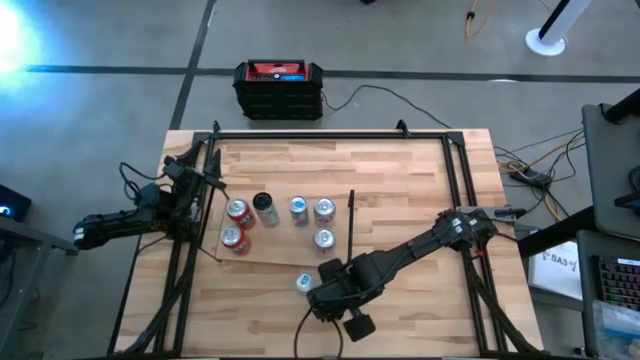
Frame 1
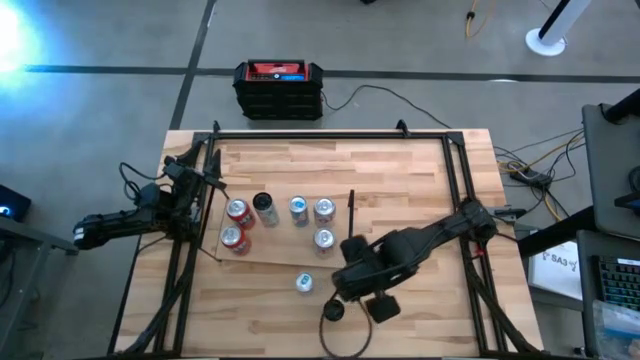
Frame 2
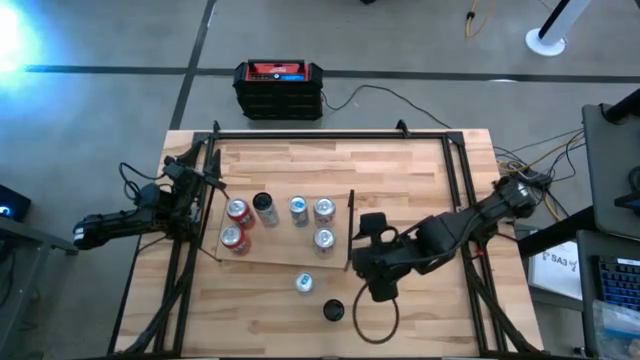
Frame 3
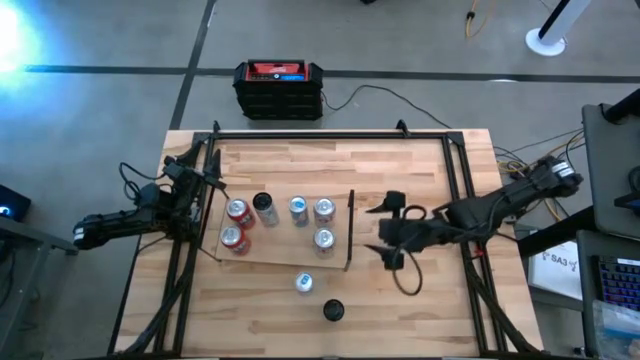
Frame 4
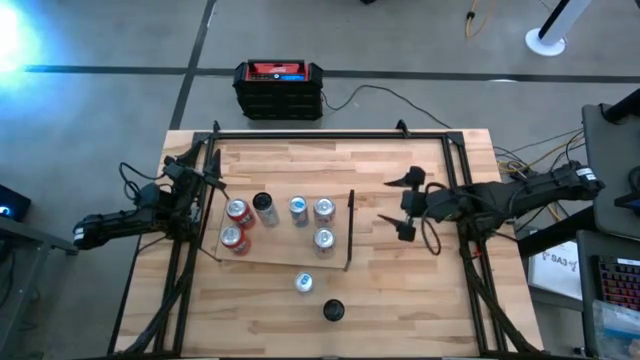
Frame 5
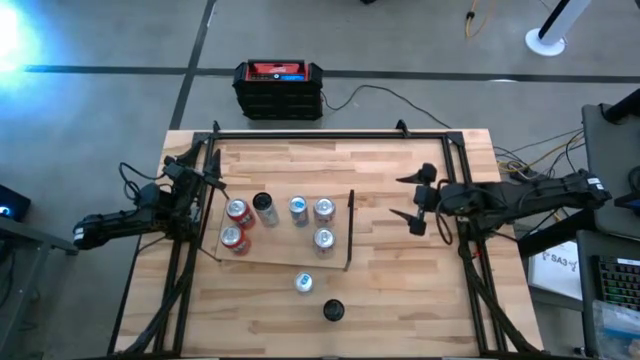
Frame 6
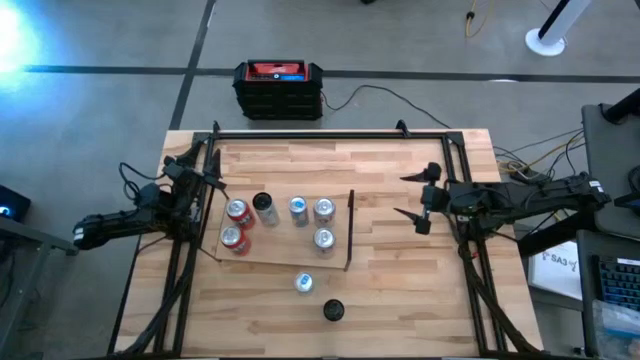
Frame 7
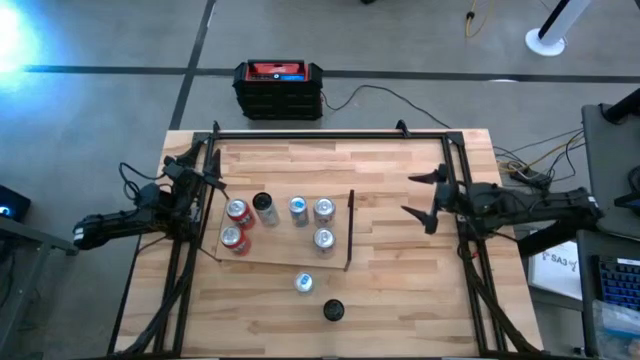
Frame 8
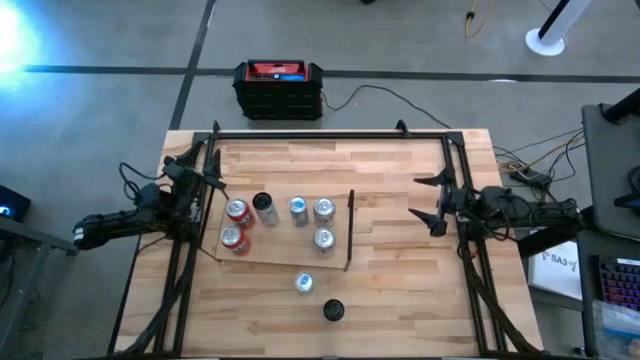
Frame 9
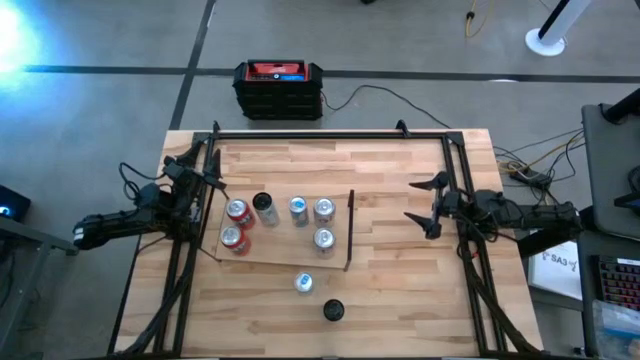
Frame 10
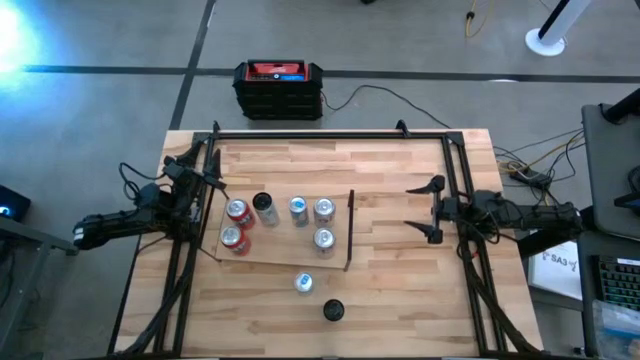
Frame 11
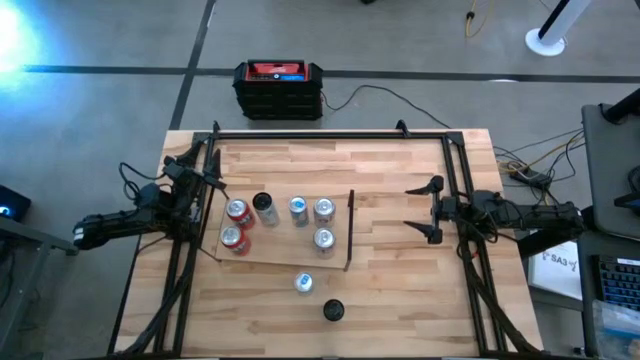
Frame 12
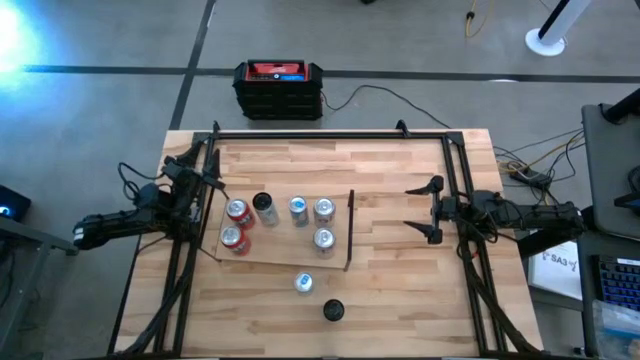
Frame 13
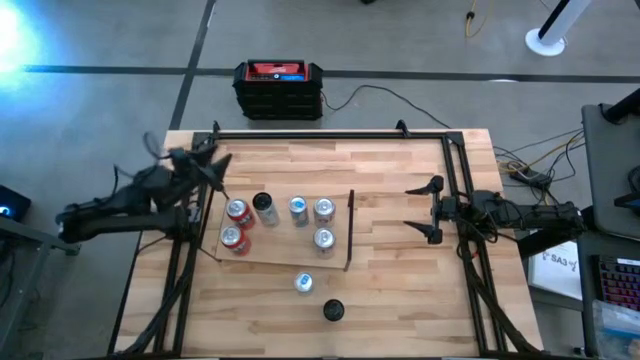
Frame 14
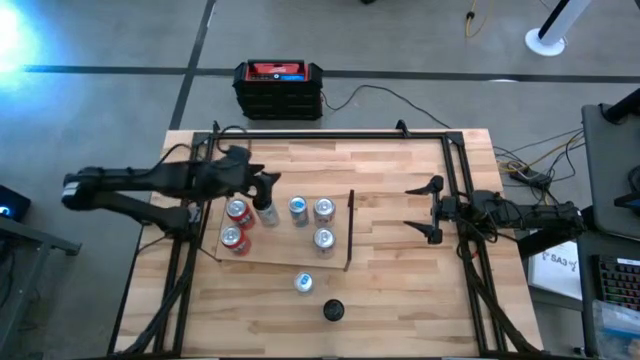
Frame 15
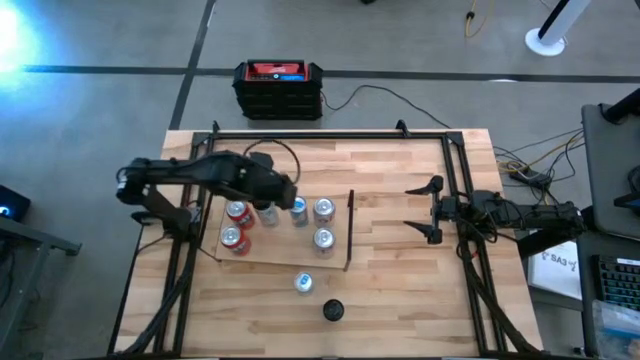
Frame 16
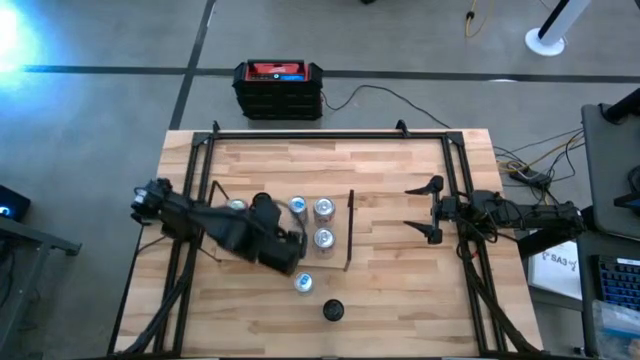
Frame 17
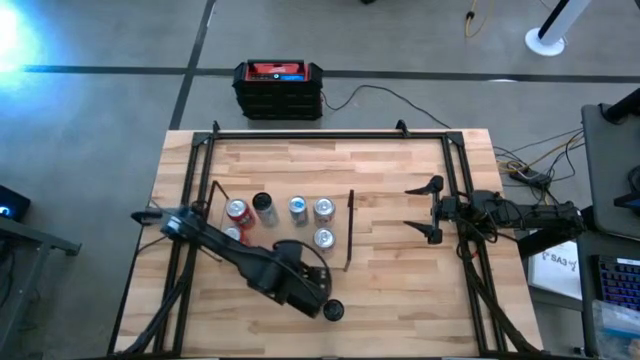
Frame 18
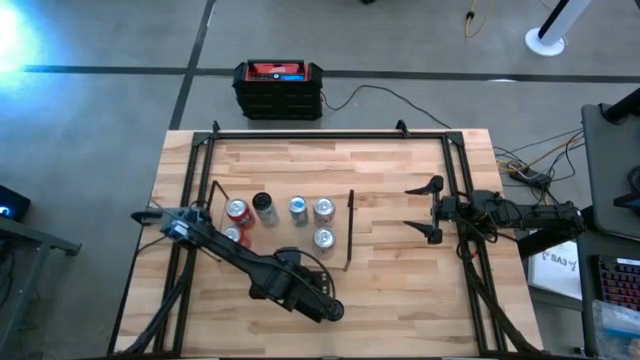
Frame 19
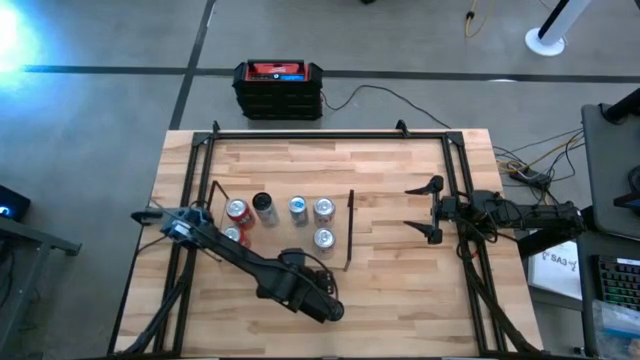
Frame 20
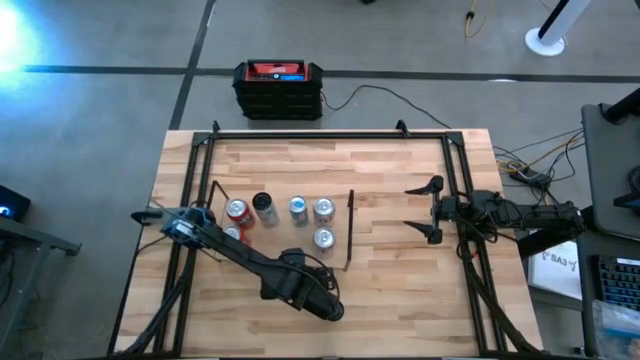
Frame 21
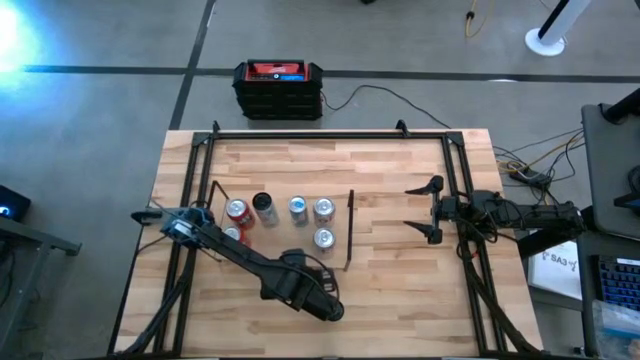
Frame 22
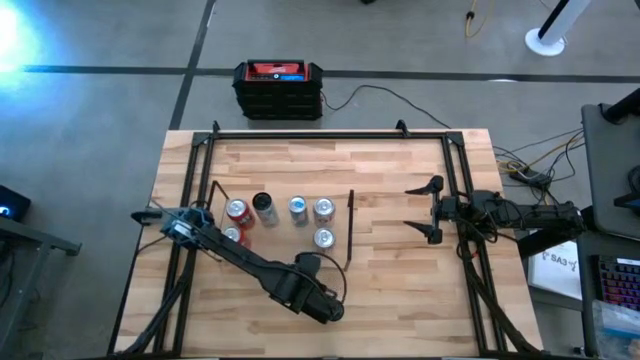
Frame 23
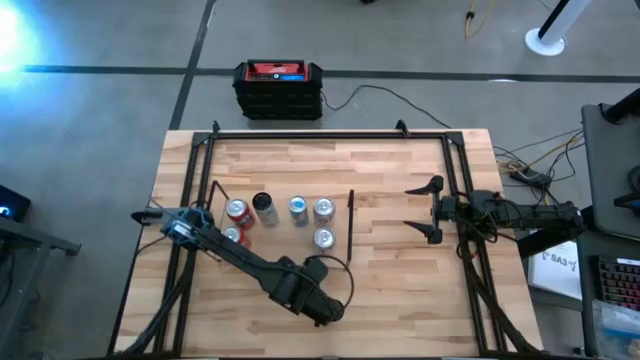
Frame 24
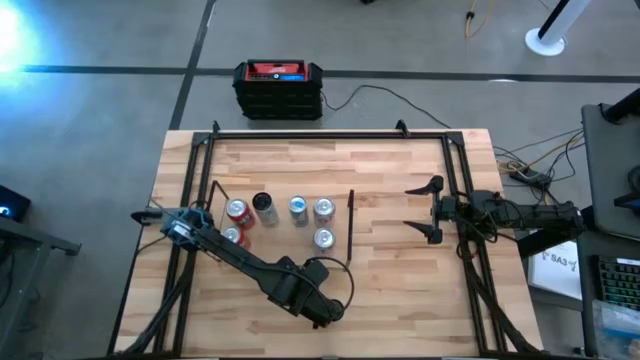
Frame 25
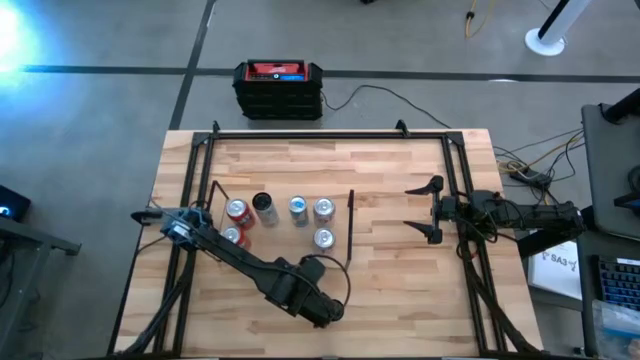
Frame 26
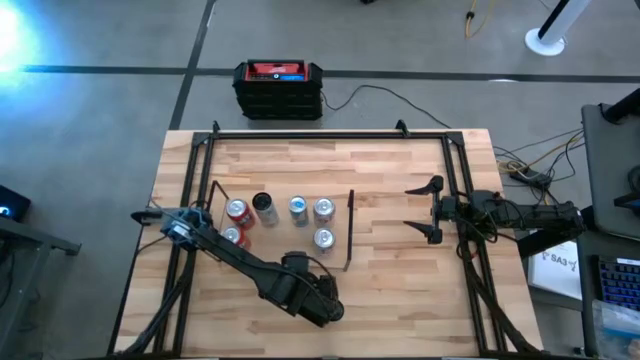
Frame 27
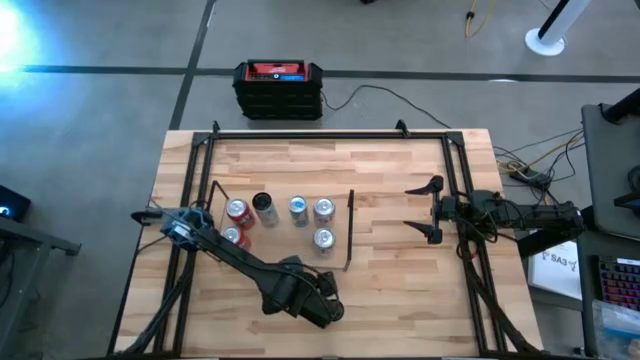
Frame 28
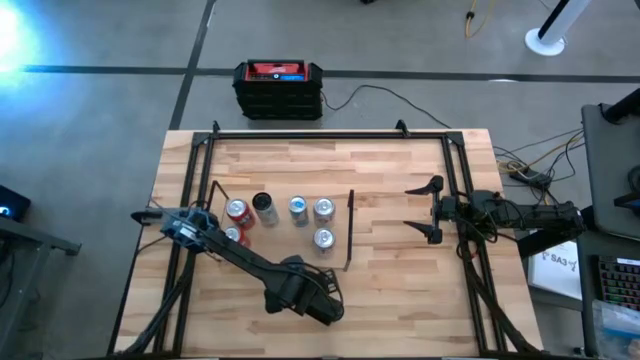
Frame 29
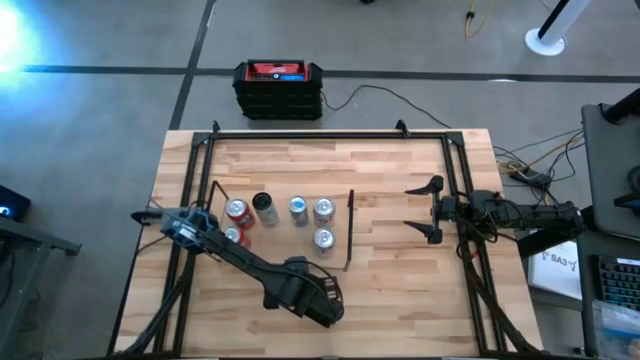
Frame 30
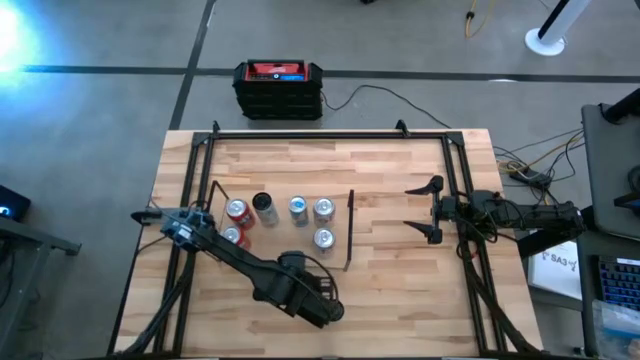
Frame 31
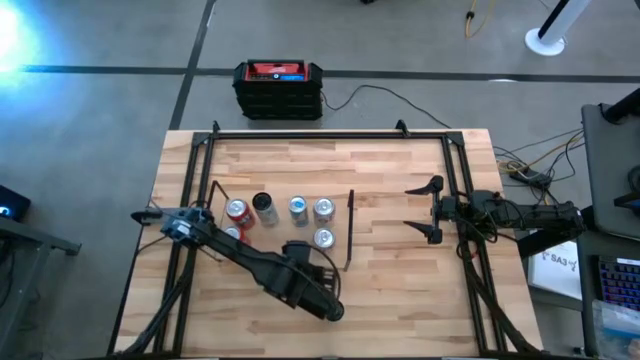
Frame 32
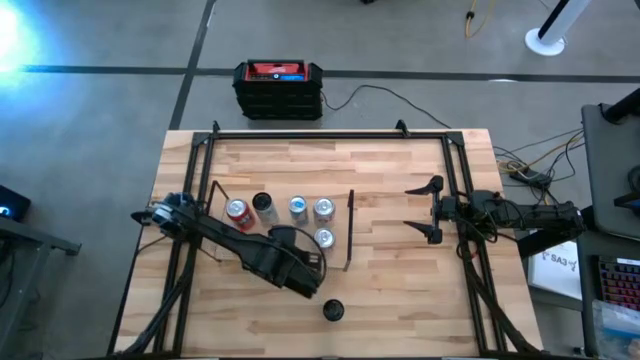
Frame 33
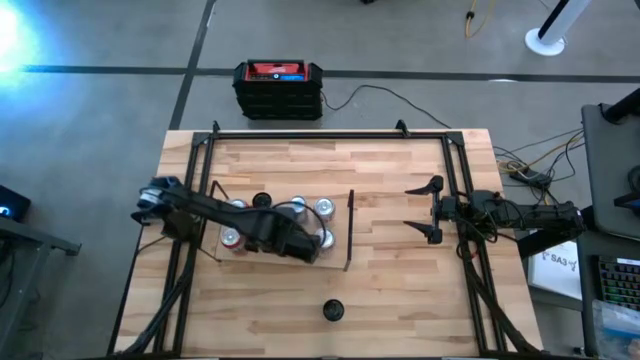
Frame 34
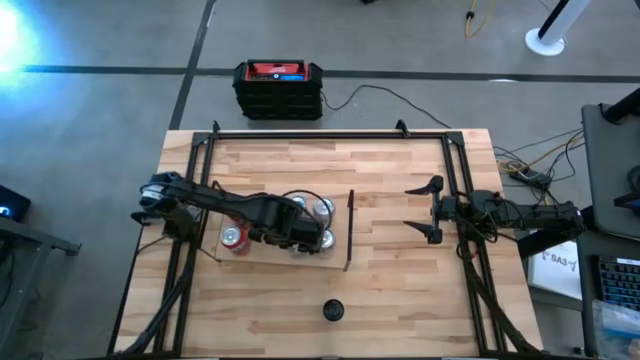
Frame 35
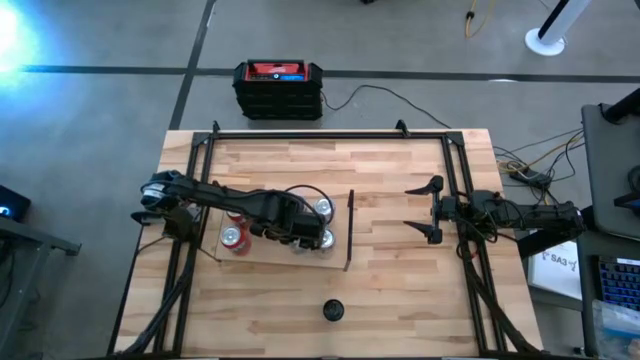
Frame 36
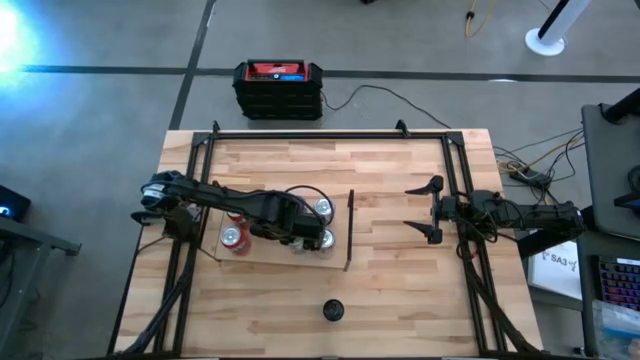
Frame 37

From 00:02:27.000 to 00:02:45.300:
Task: Place canned beverage on shelf
Put the blue soda can on the shelf aligned with the other blue soda can

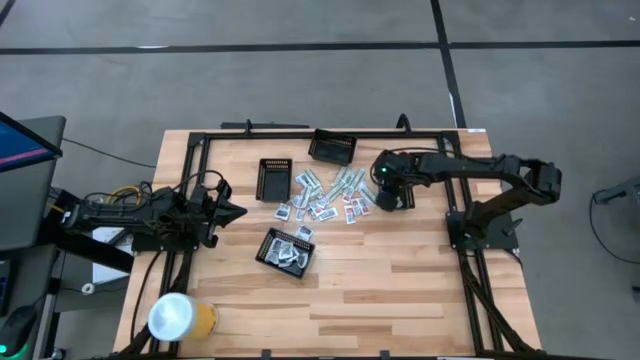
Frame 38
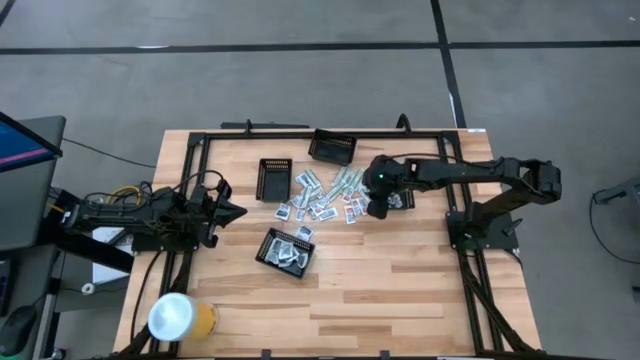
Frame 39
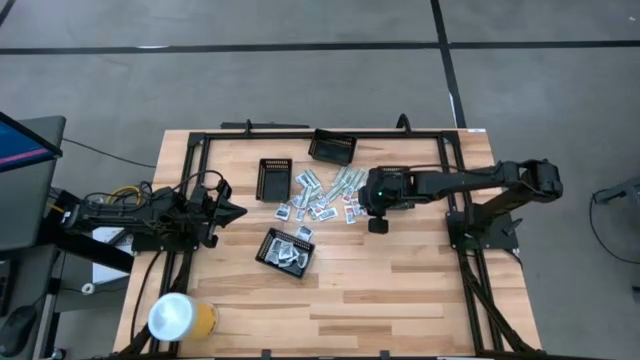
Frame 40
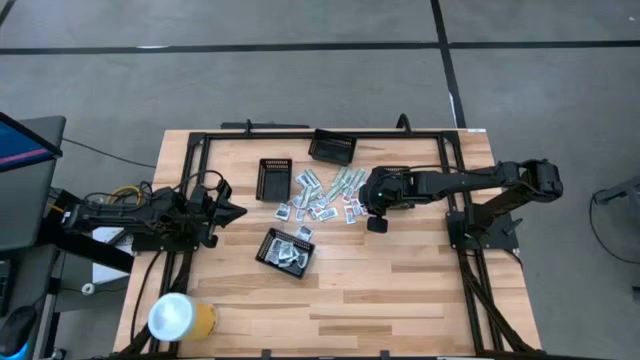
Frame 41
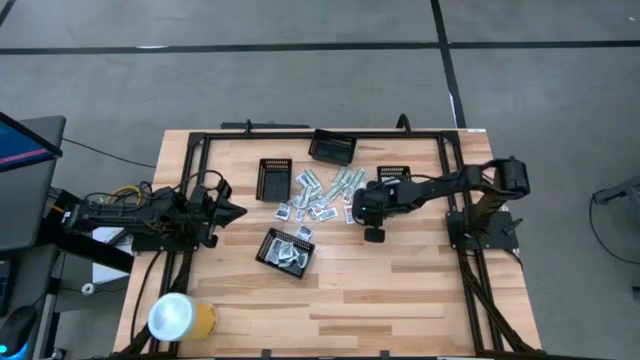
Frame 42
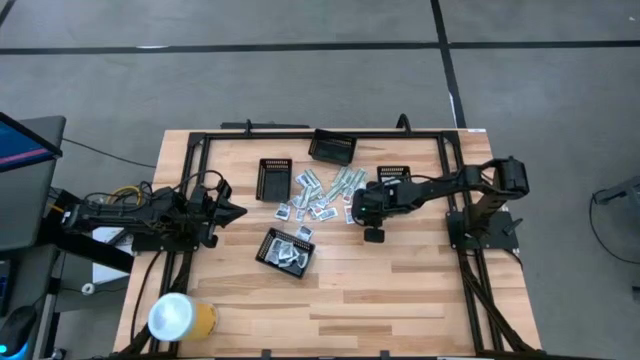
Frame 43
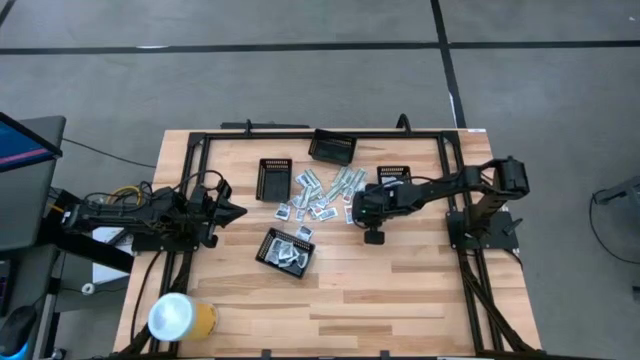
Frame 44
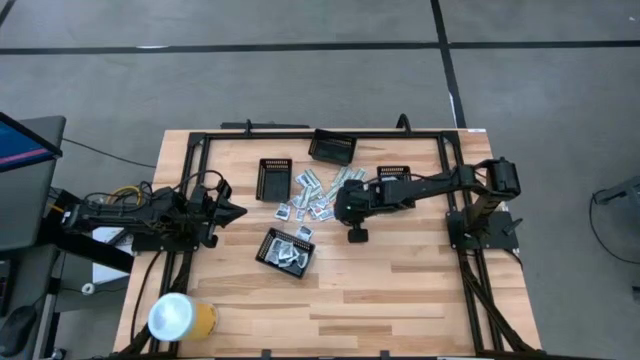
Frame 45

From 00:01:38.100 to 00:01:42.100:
Task: Pick & Place First Aid Supplies
Put the orange ointment pack into the top black bin
